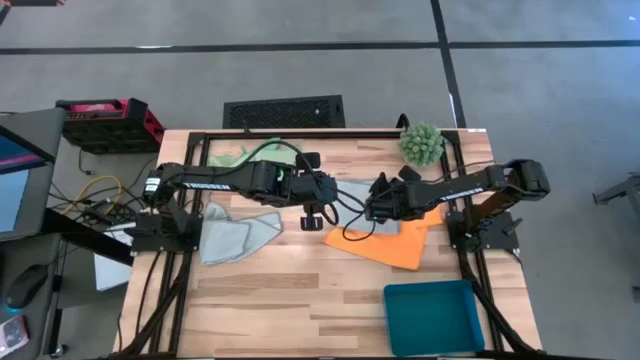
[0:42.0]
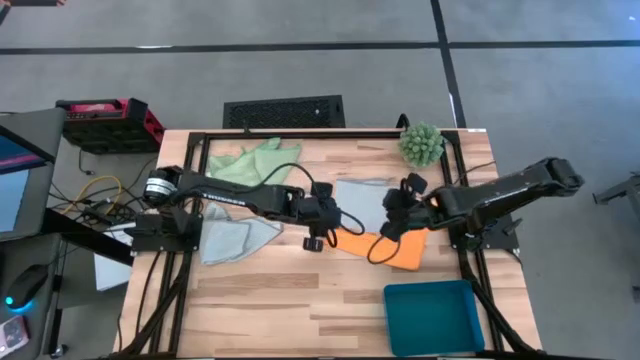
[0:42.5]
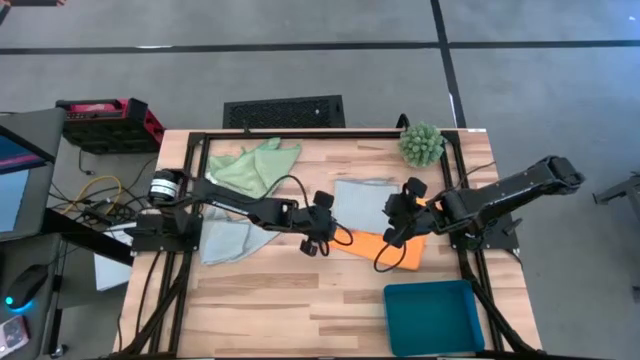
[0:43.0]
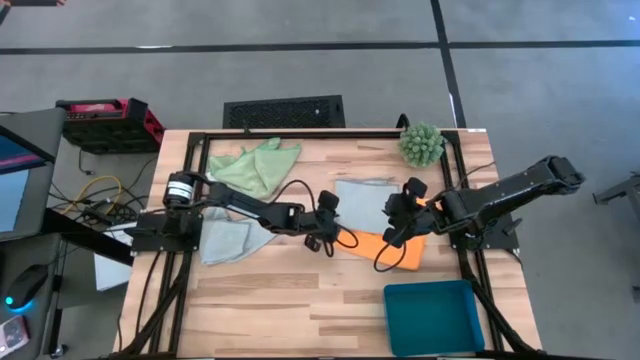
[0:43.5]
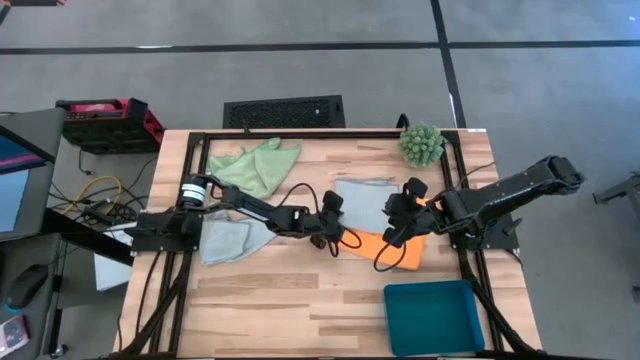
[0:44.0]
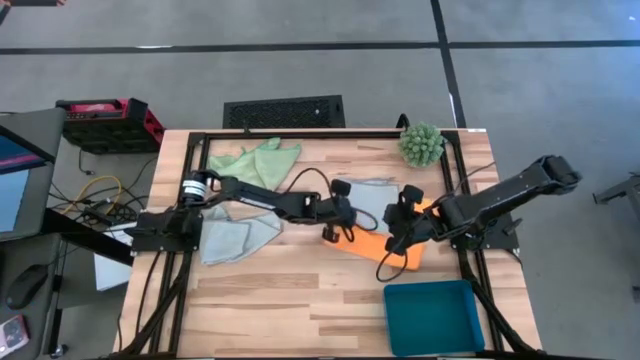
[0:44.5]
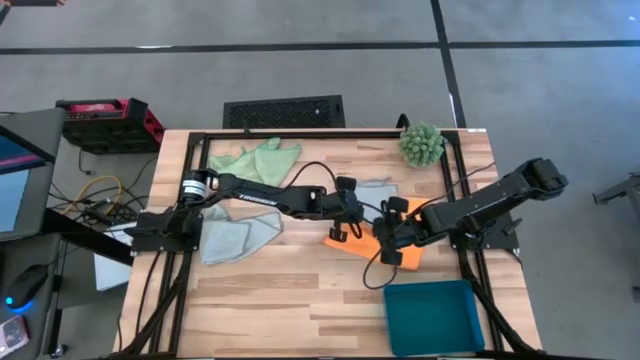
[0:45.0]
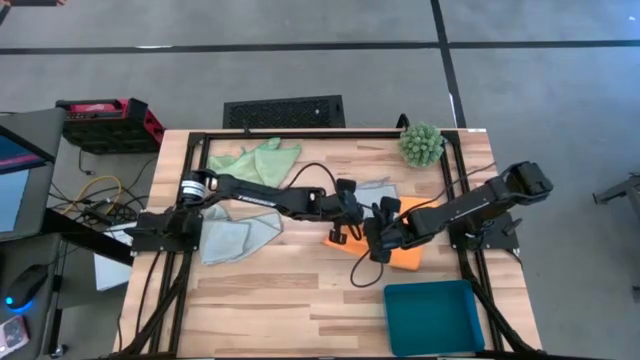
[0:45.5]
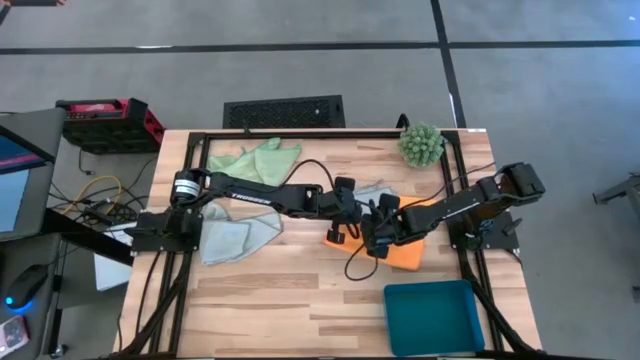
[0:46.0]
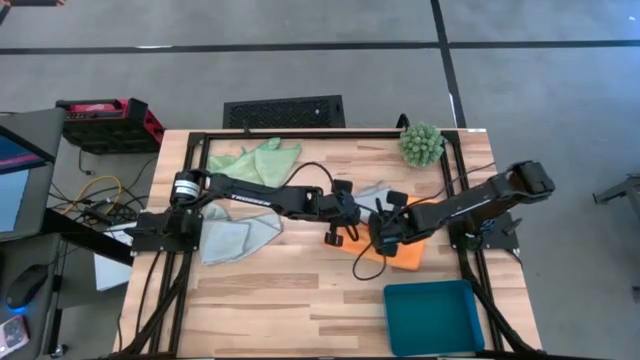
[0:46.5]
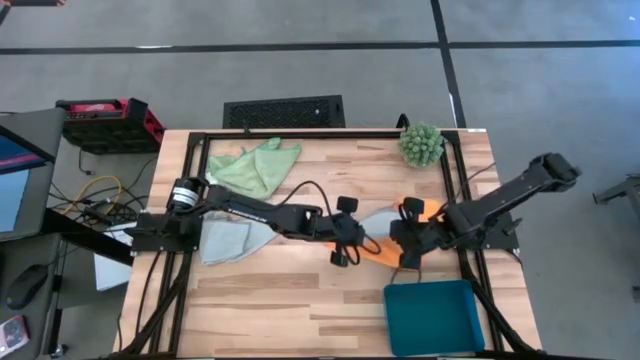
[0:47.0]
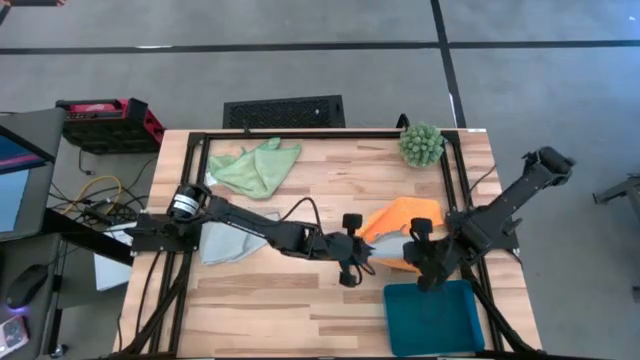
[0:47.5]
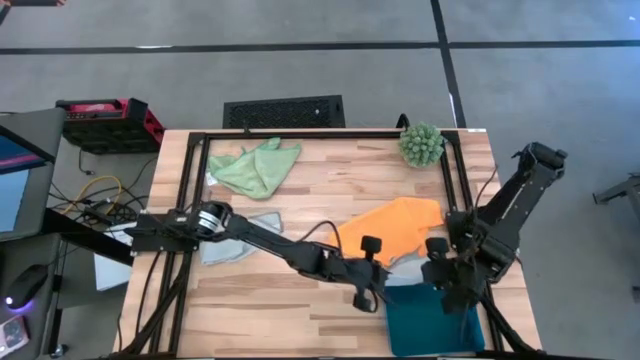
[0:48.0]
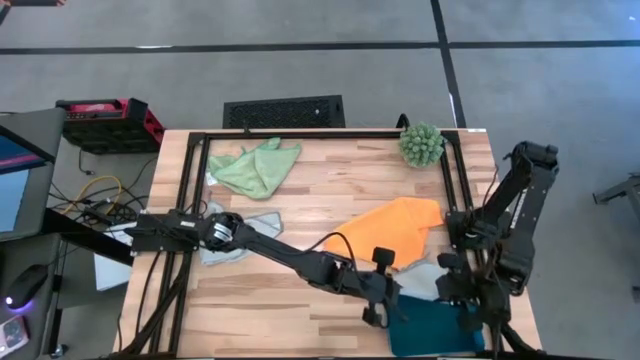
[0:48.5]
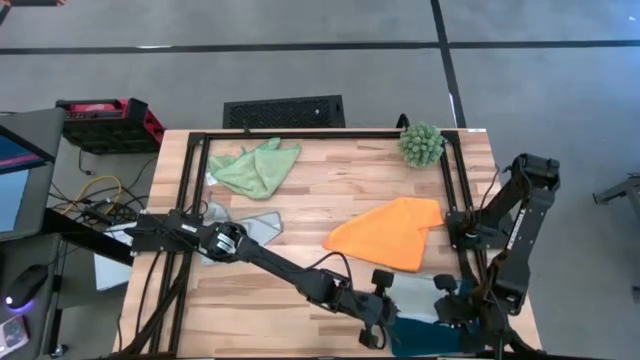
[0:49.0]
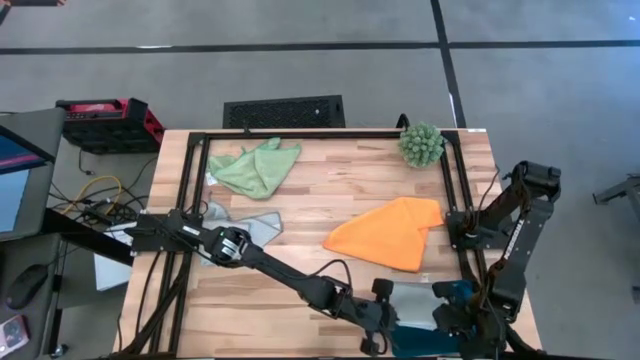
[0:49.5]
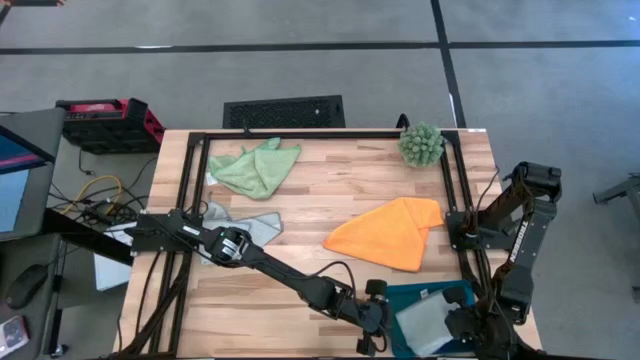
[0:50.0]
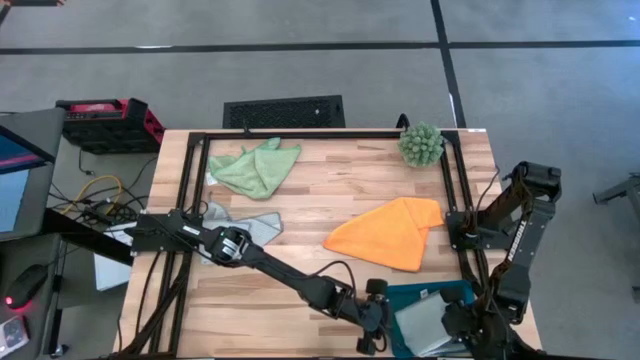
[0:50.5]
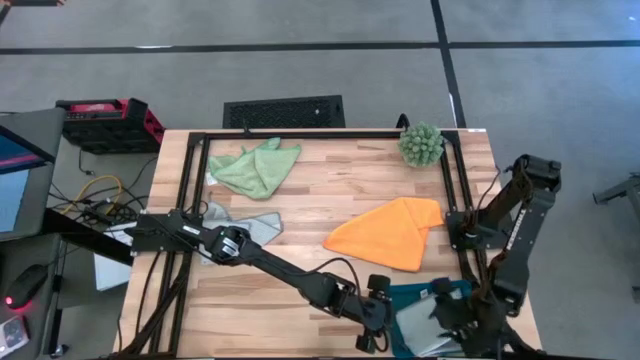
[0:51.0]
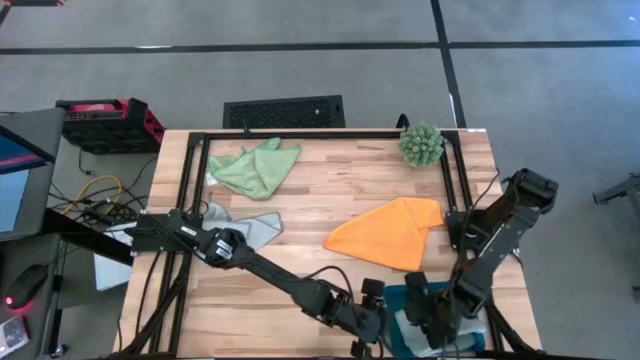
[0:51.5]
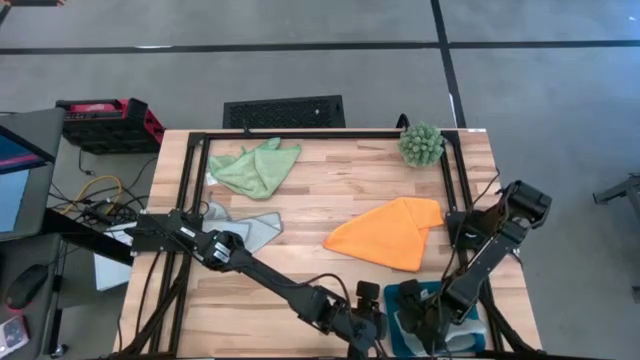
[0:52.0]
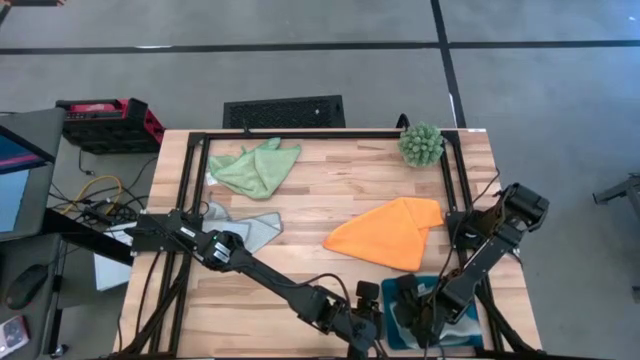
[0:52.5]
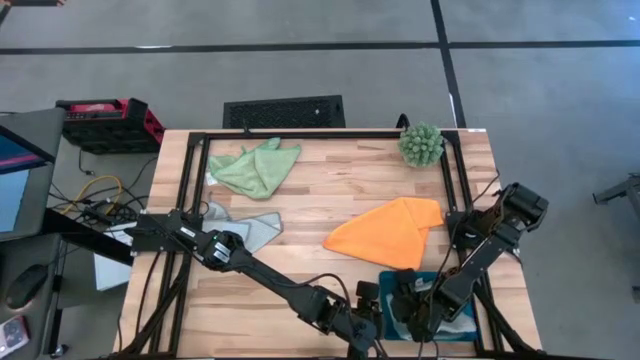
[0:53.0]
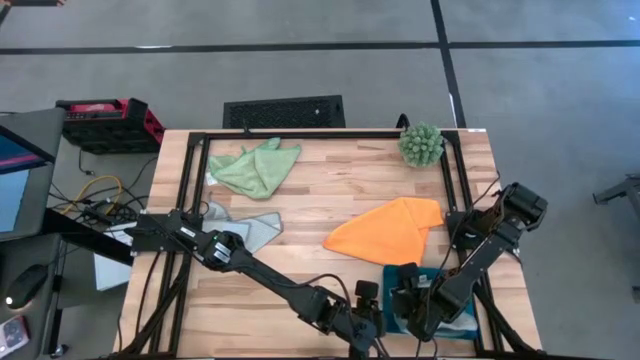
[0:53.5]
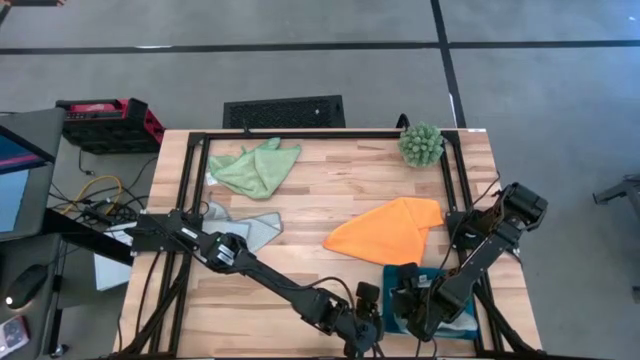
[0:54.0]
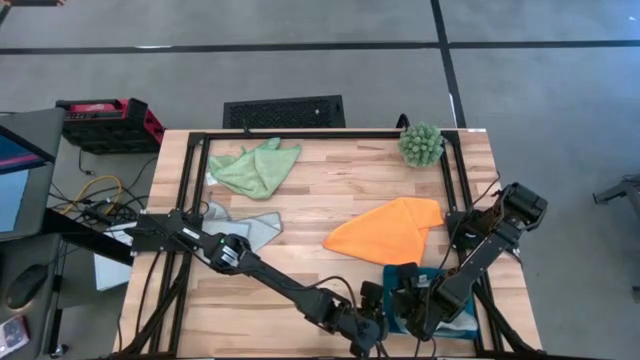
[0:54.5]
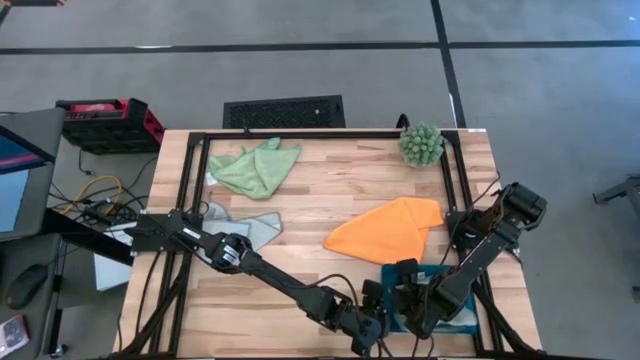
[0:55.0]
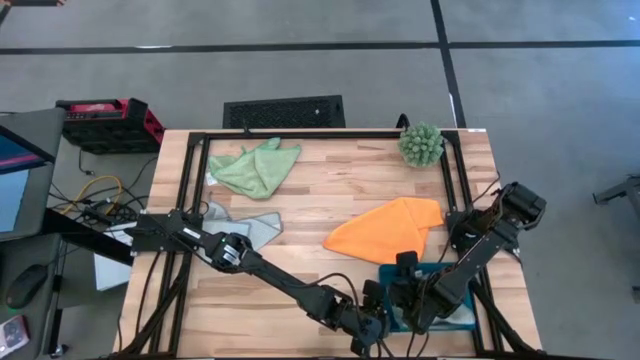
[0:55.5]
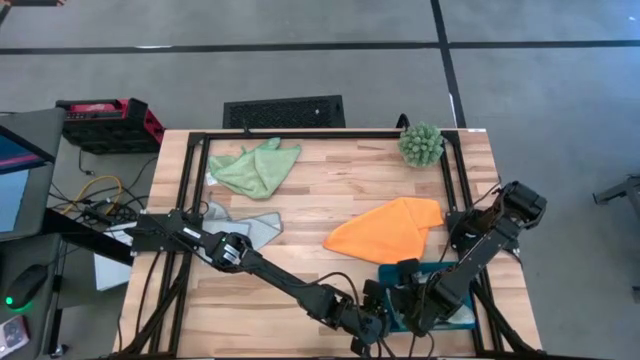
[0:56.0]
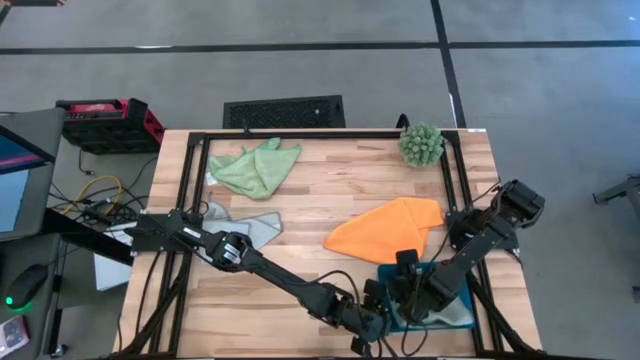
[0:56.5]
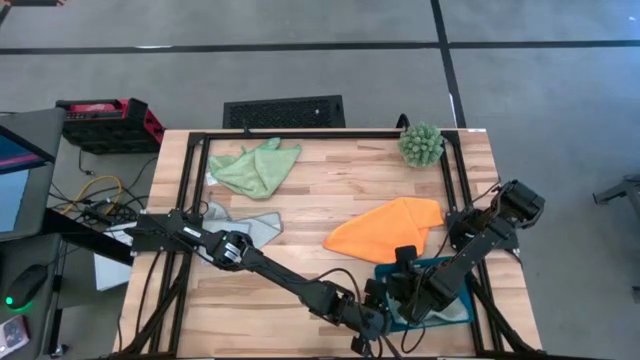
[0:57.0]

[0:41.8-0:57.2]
Task: Fold microfiber towels
Put the folded right gray towel into the blue bin

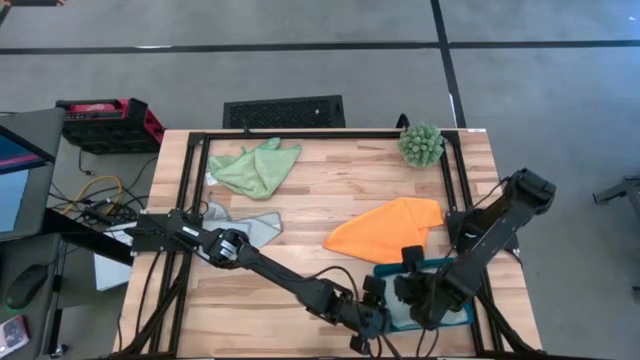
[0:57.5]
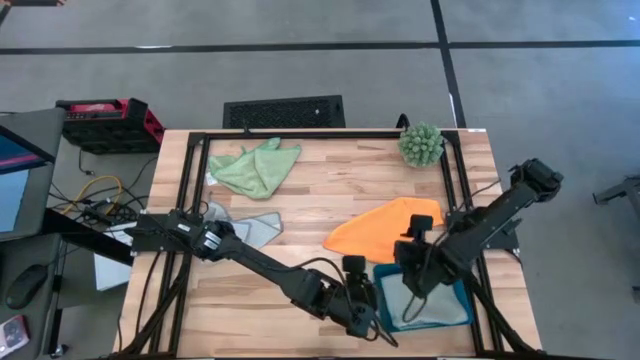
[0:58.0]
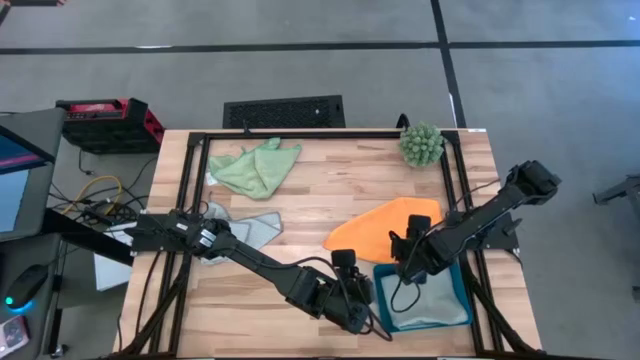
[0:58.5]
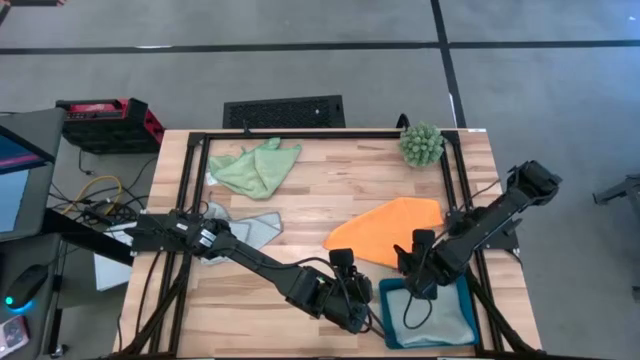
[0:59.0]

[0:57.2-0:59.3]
Adjust the blue bin

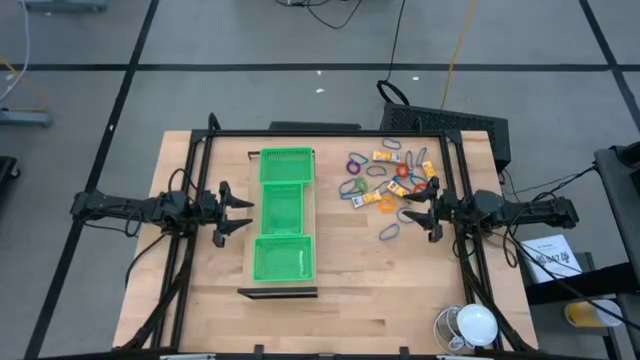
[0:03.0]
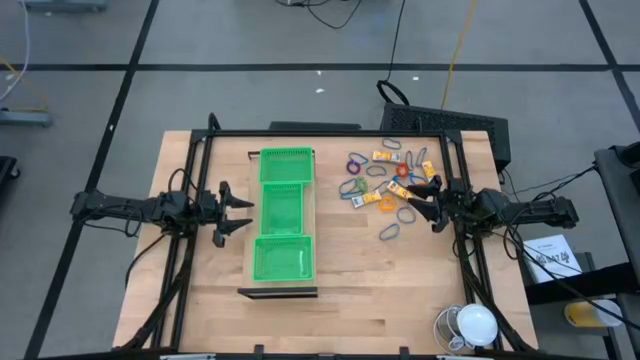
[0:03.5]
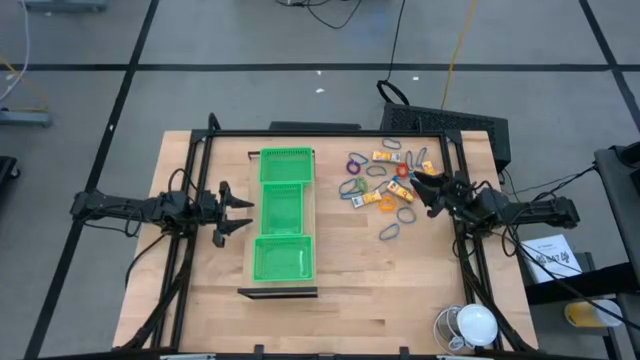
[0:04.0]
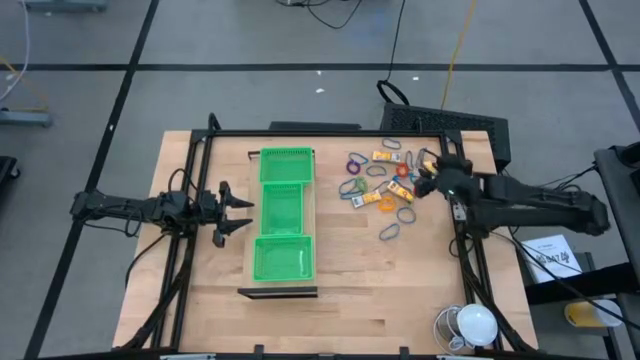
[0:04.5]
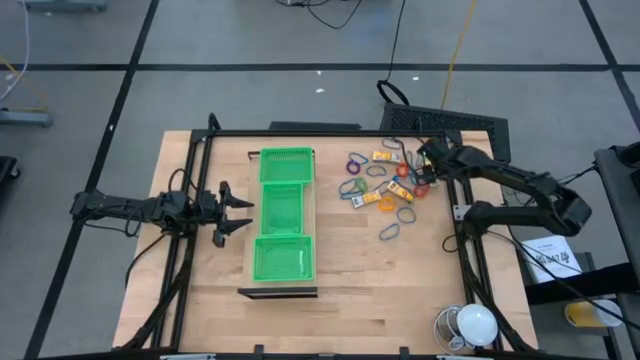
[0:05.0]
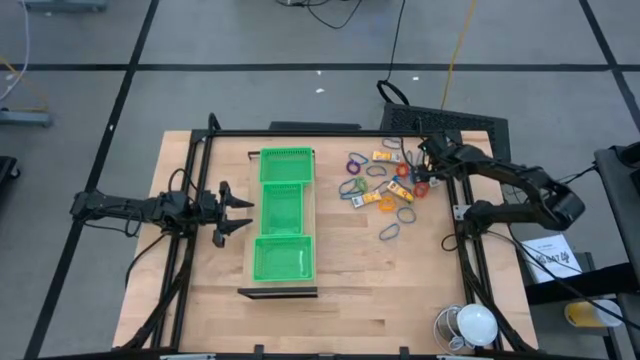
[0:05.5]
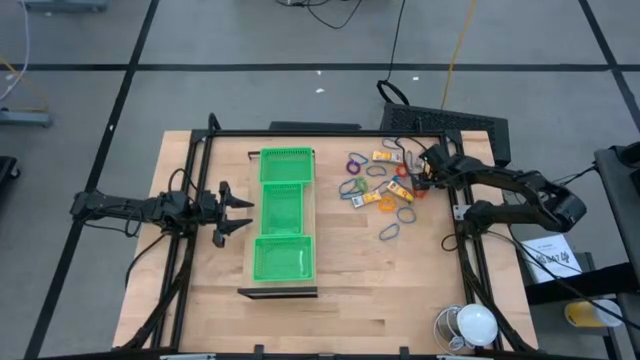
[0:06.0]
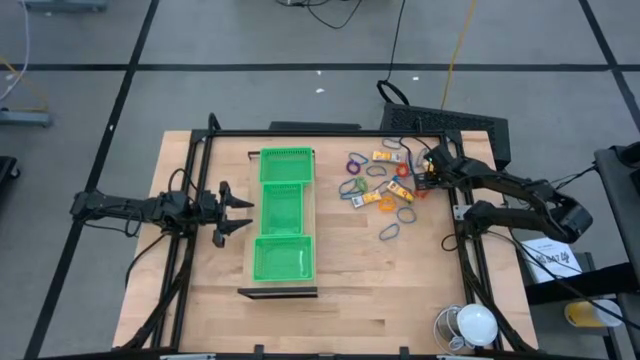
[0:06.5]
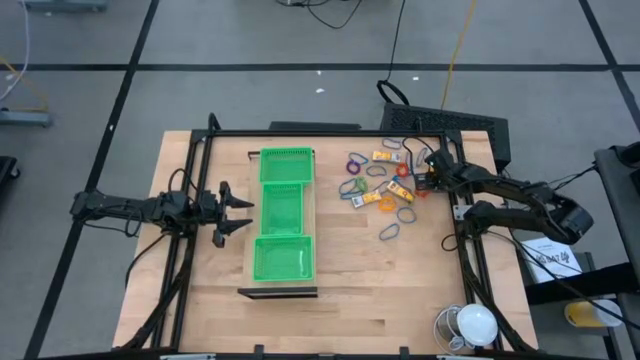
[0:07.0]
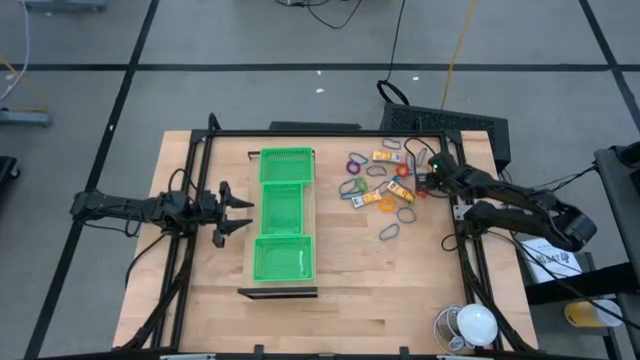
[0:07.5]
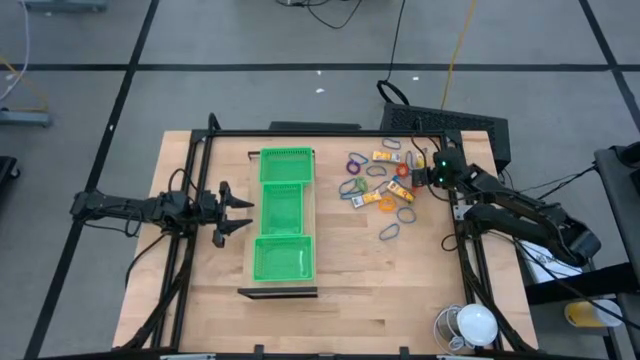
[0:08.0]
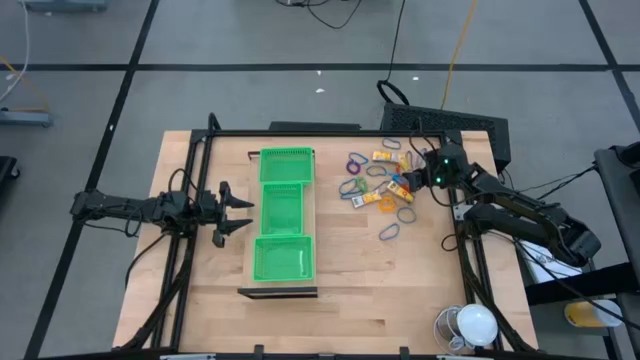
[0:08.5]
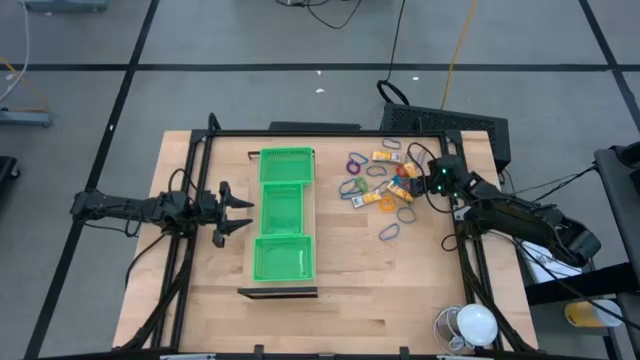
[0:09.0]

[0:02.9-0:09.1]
Task: Pick & Place Office Desk Supplies
Put the yellow crayon box into the top green bin on the shelf
